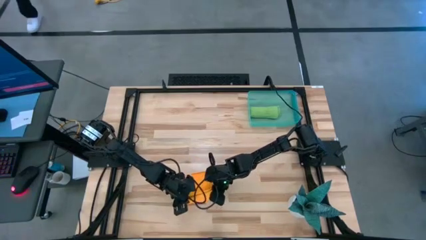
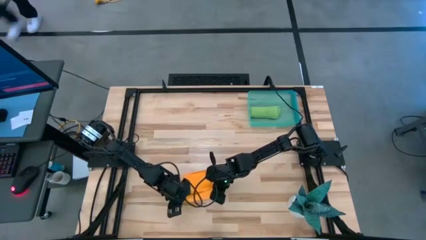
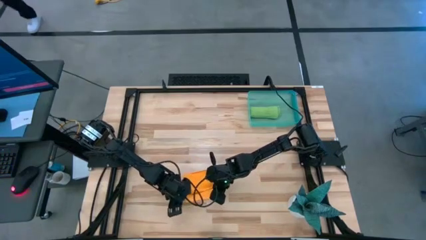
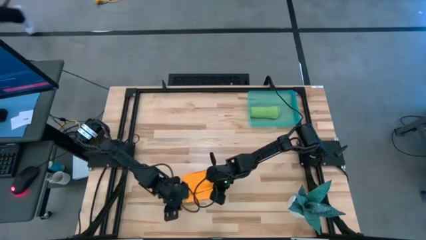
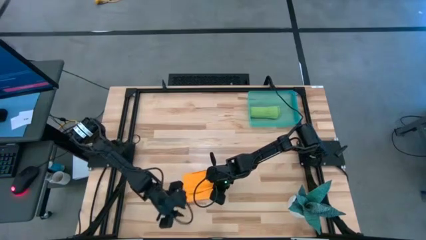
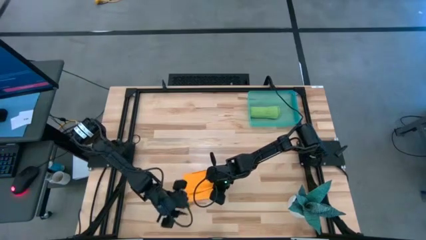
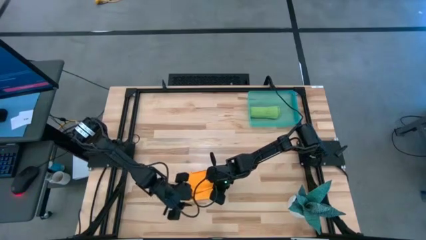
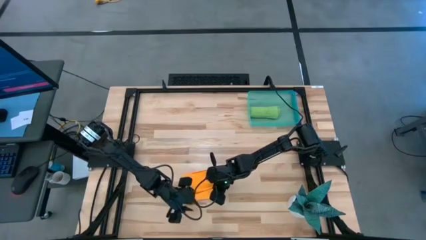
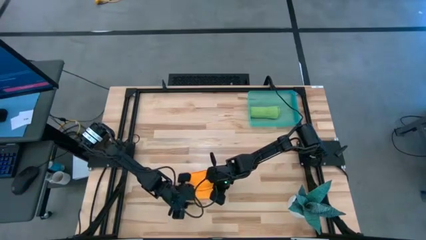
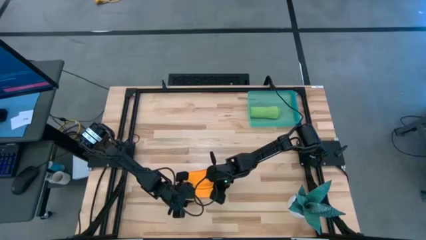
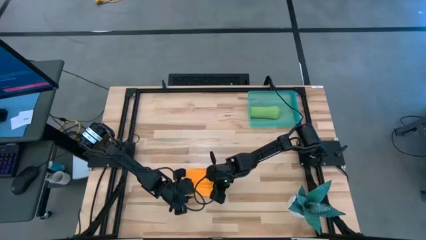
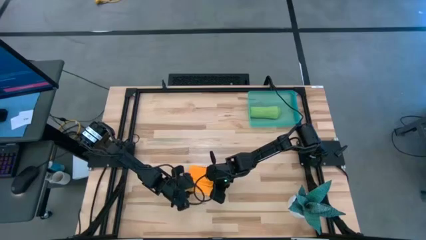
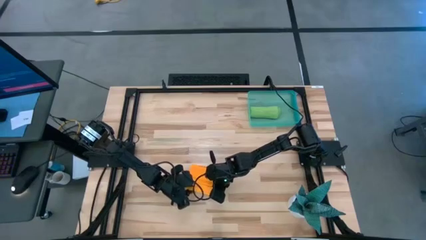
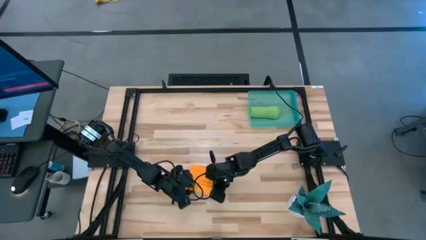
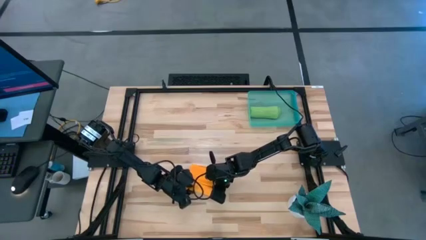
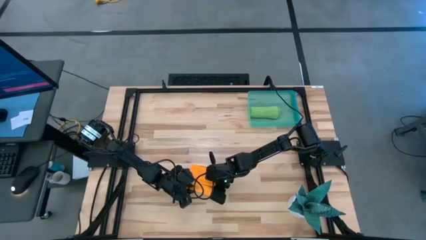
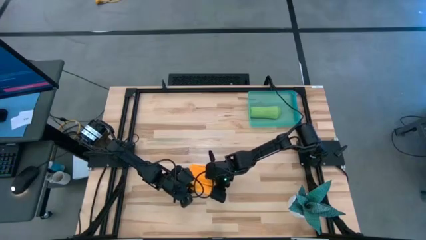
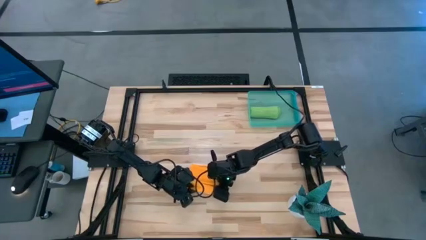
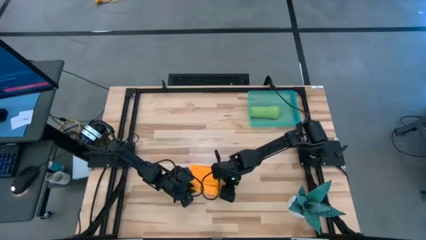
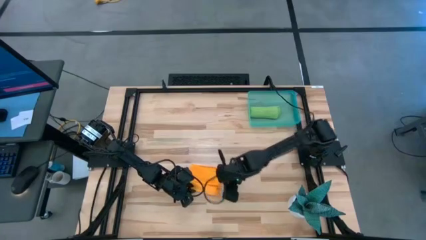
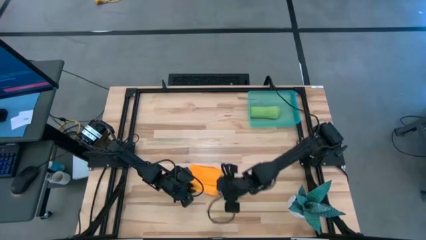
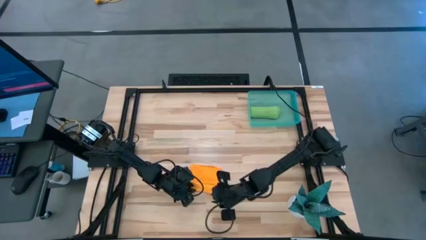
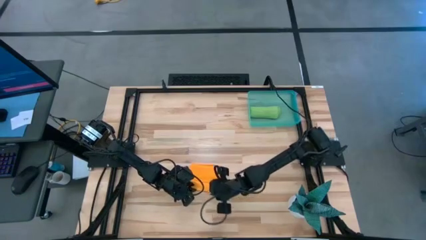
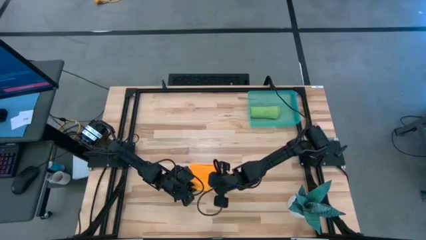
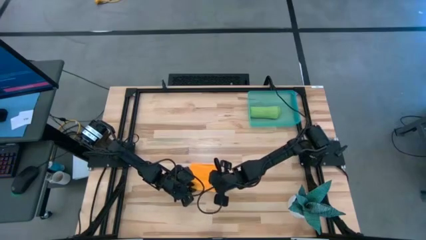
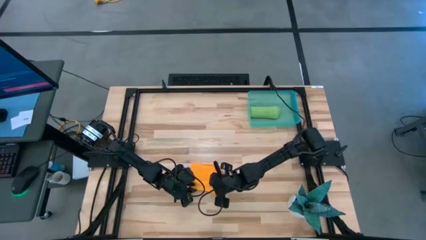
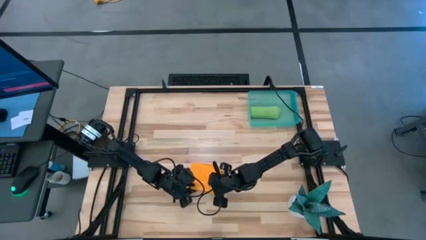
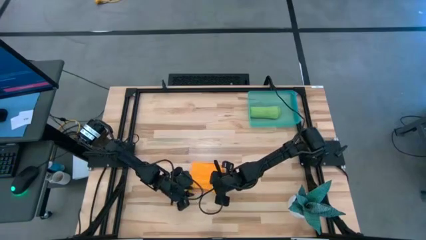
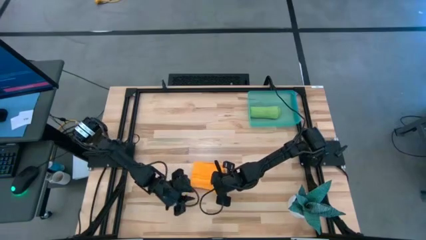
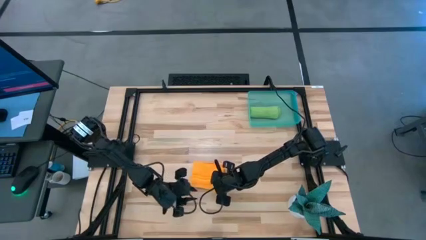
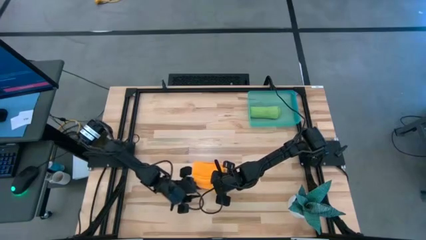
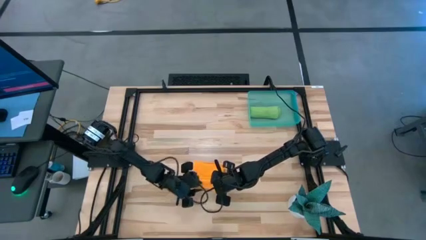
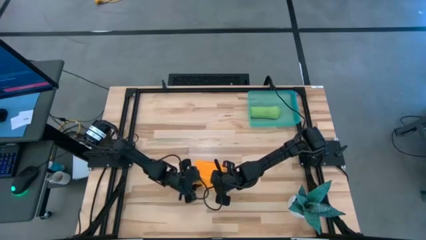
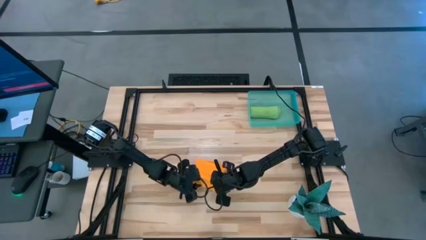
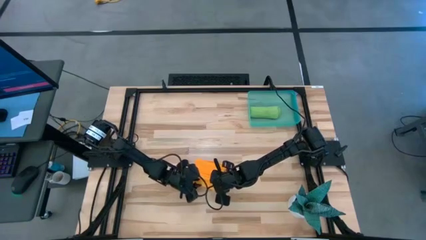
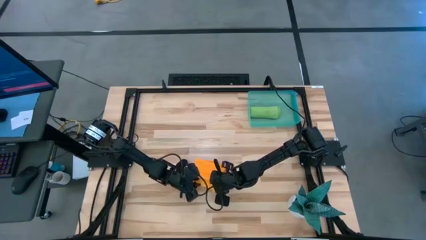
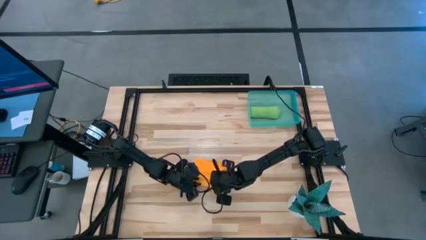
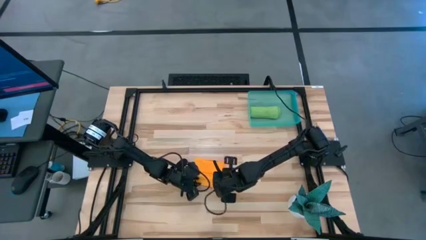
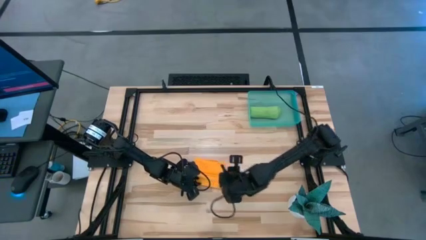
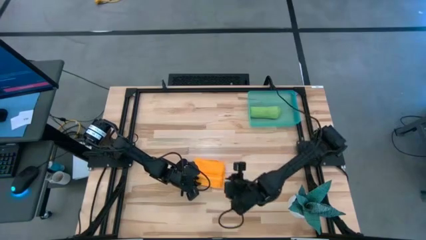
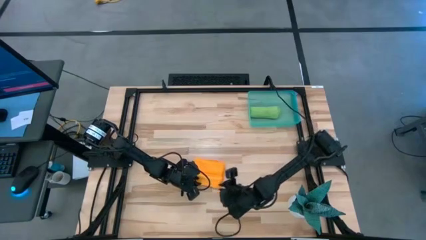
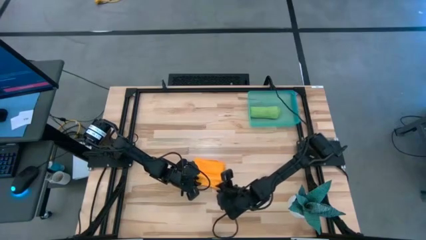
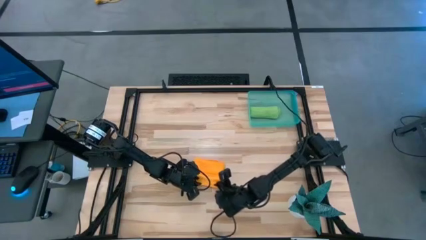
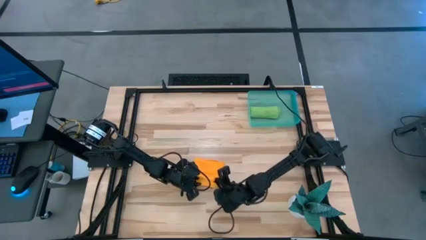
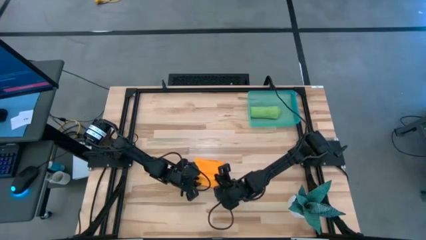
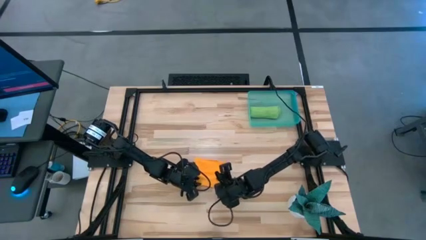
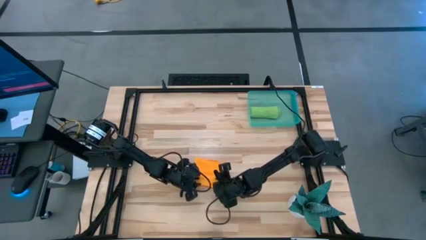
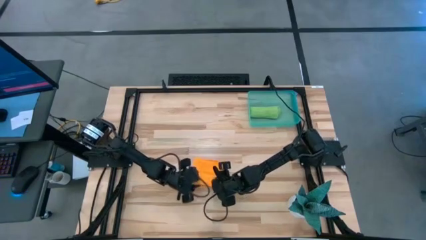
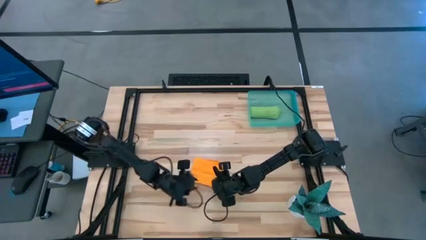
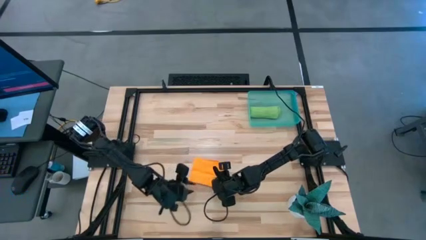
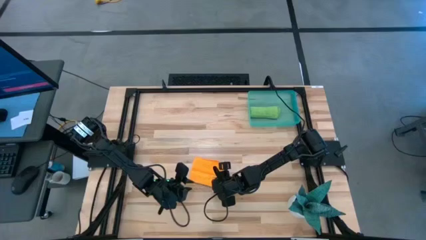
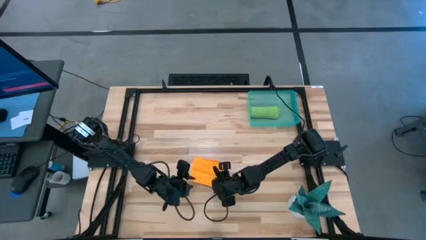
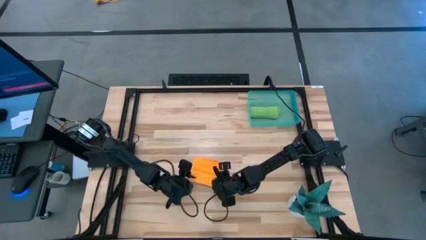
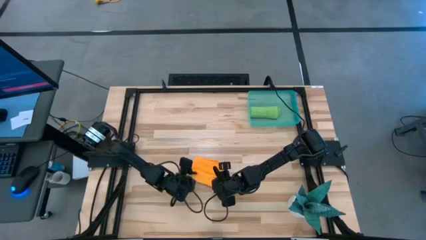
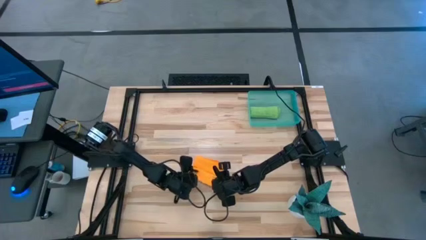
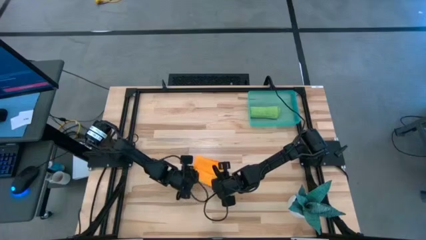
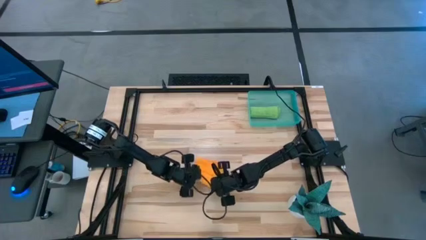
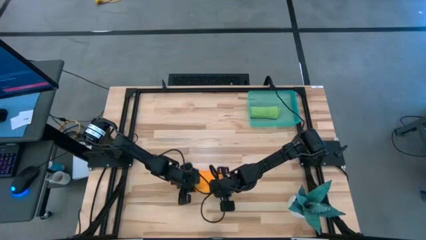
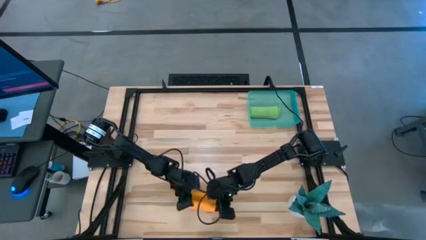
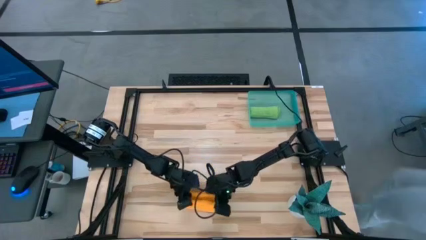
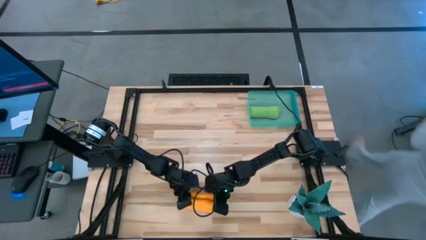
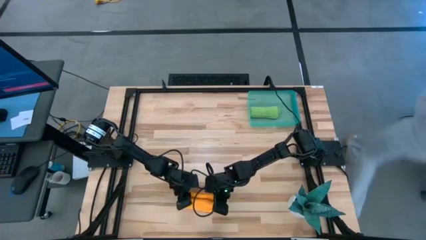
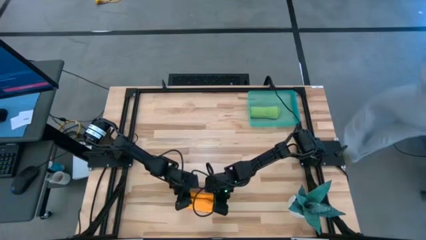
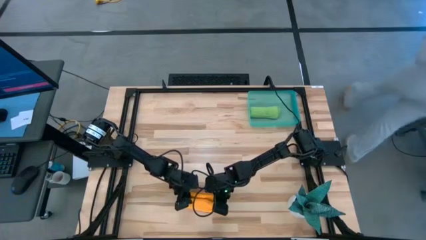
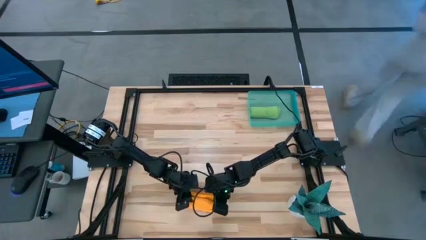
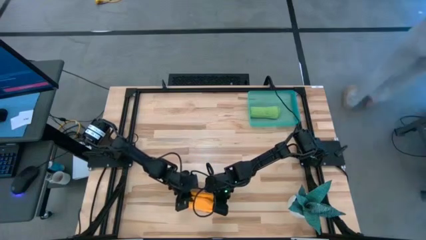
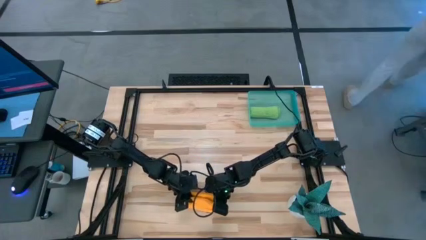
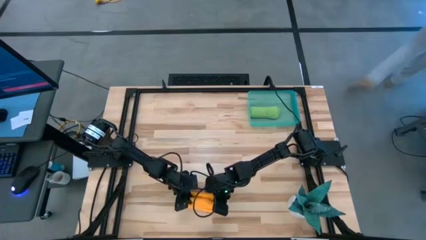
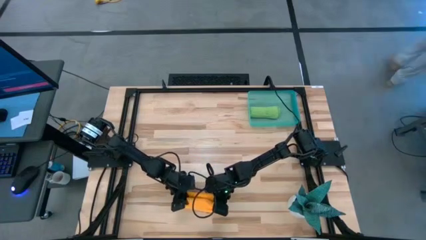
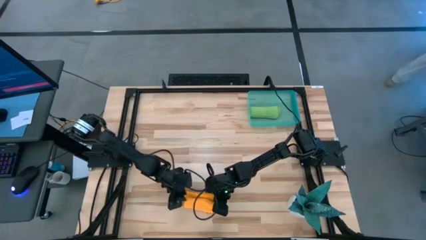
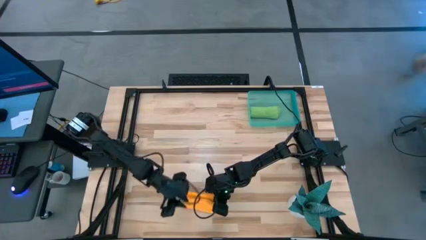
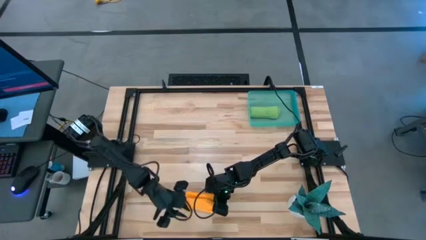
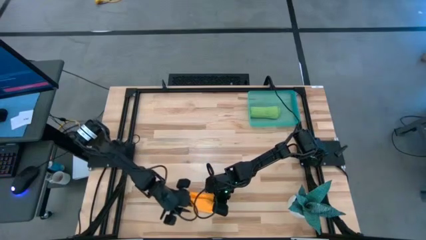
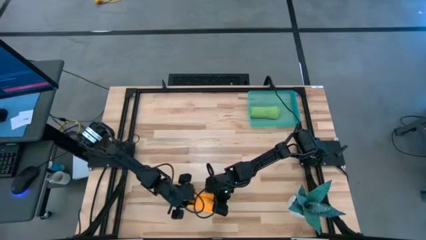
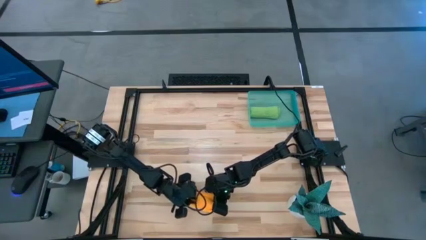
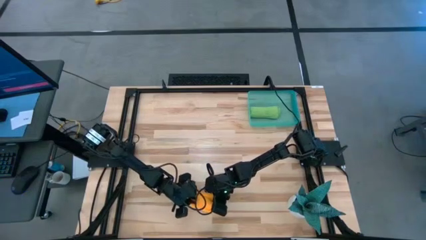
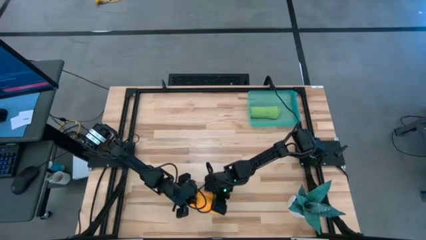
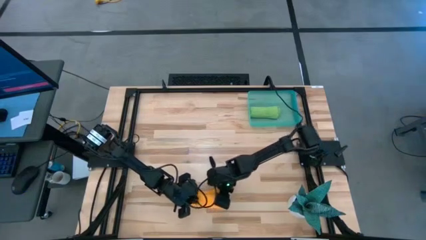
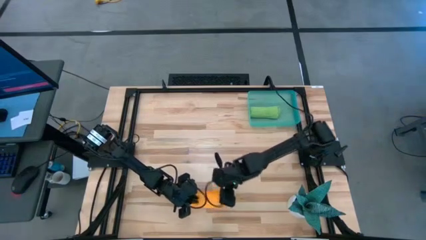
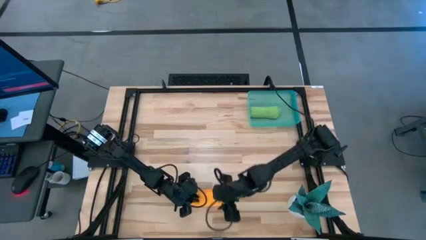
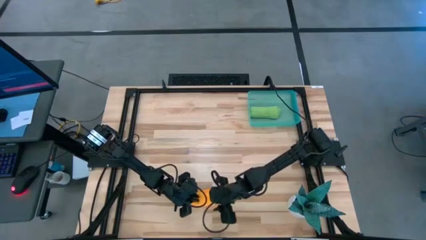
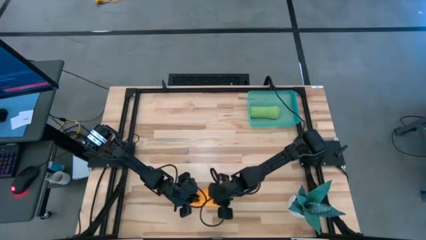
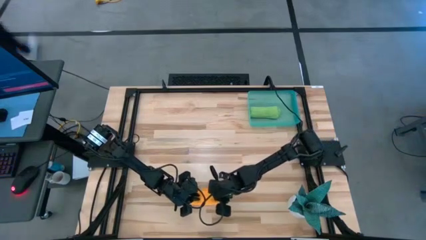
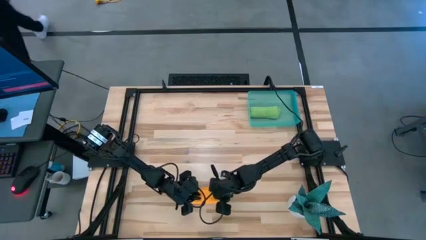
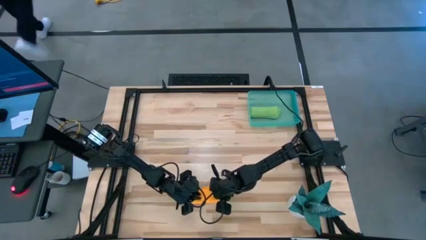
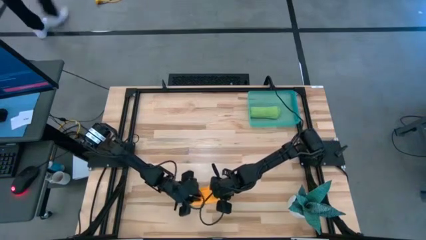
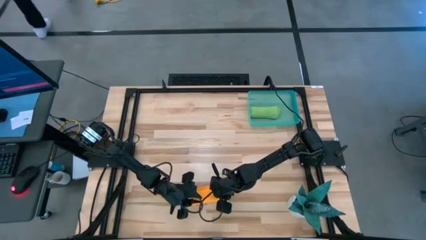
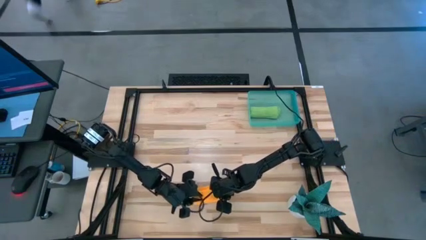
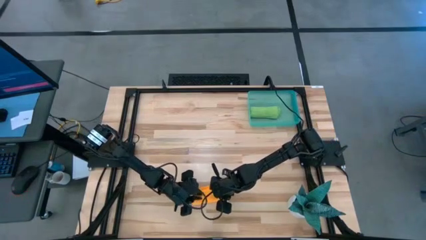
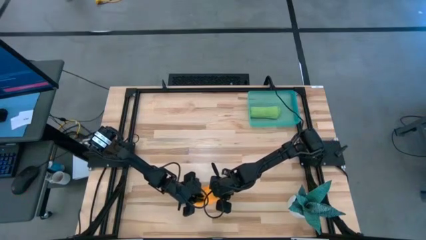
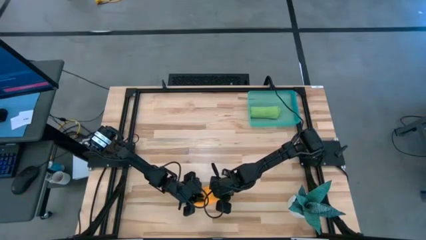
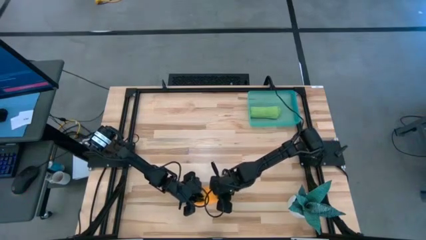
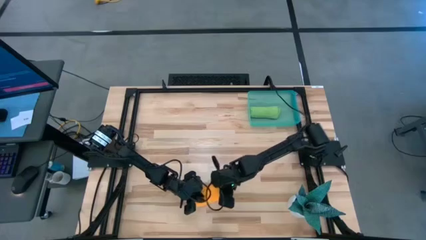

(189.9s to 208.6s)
Task: Roll microfiber towels into tight, uniform cylinder then place into a basket
Roll the orange microfiber towel
